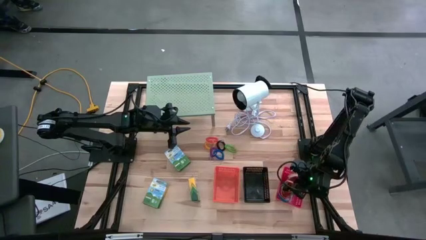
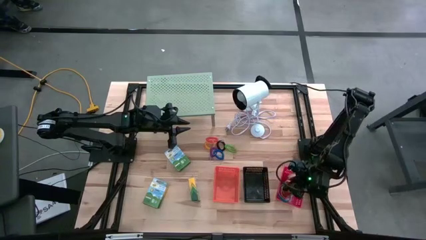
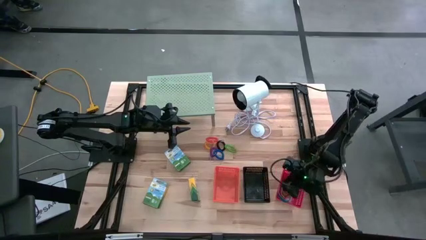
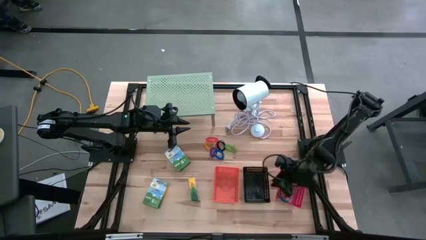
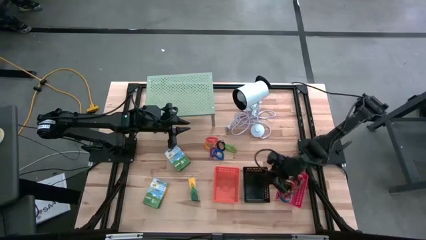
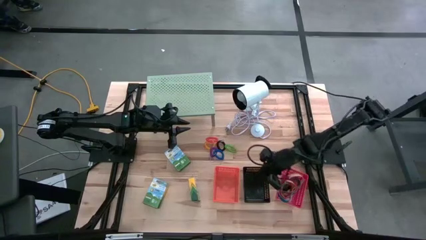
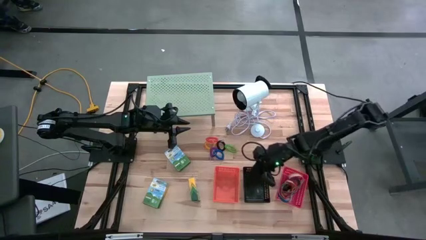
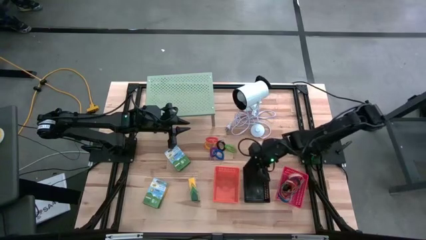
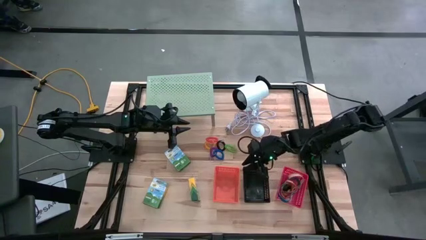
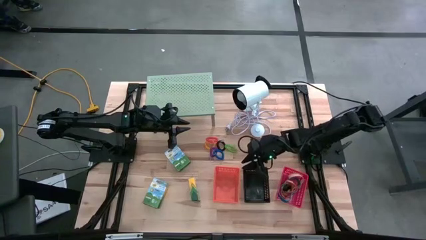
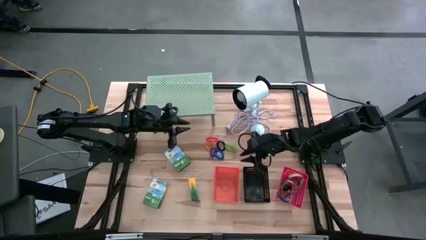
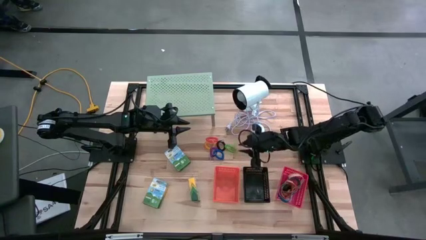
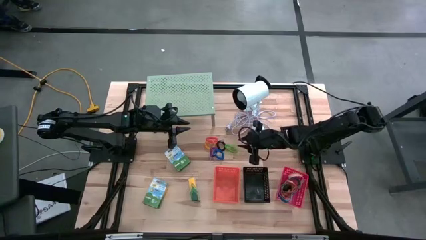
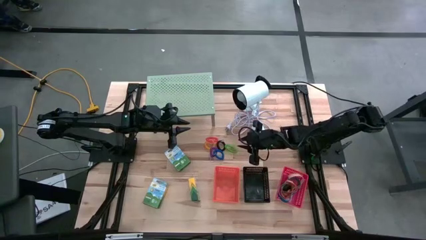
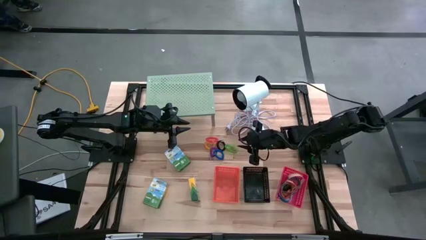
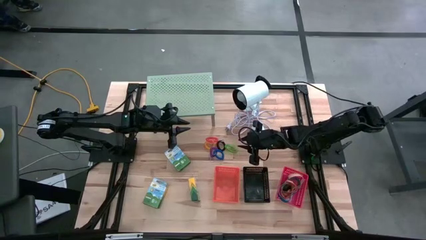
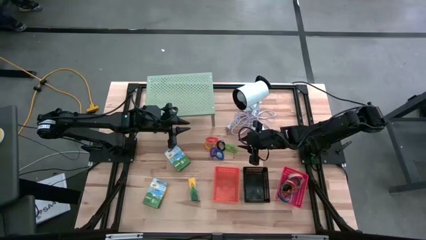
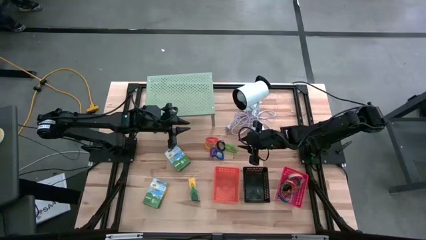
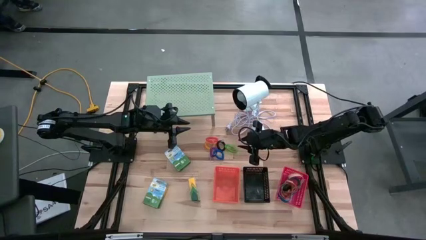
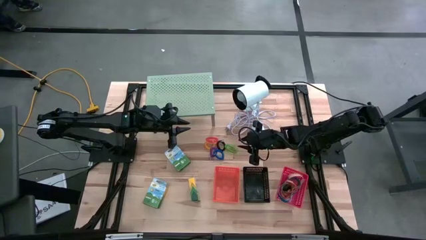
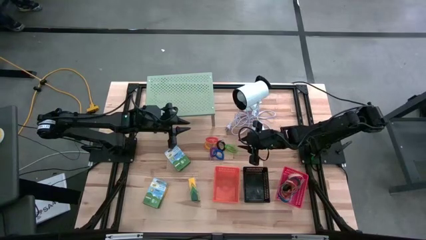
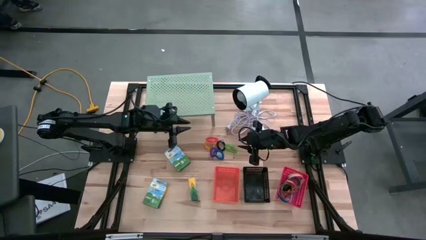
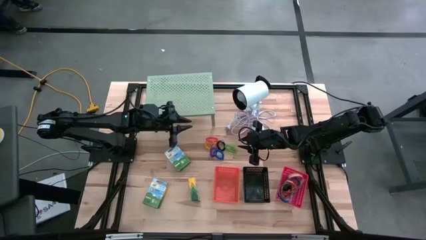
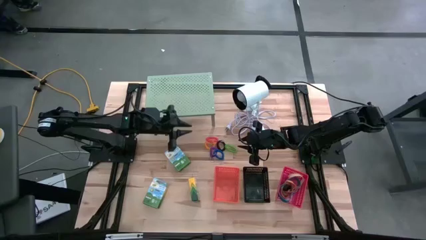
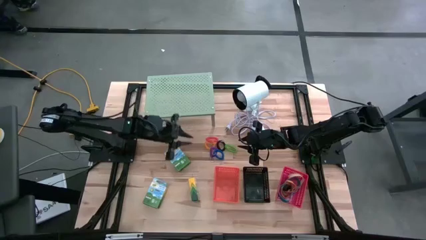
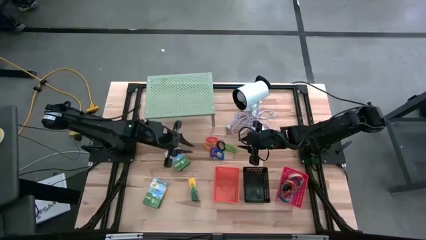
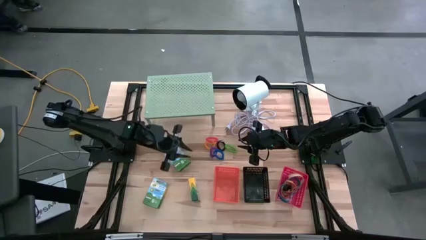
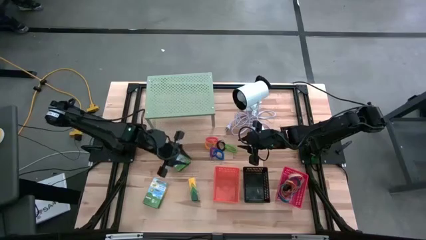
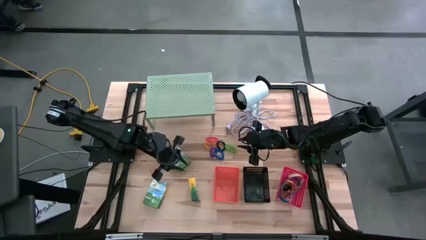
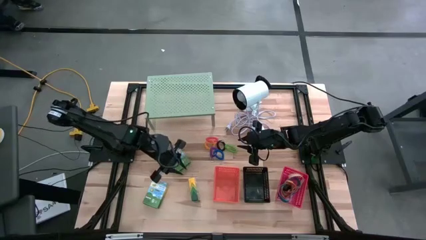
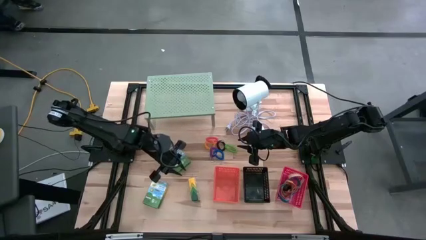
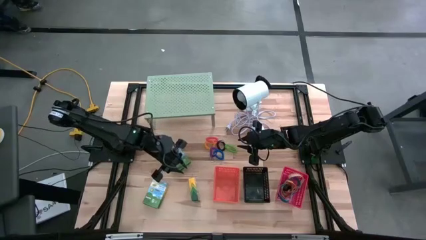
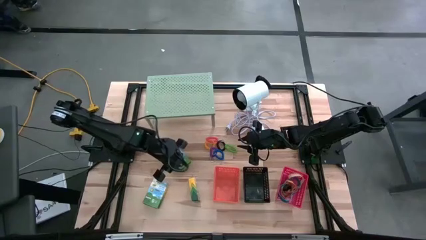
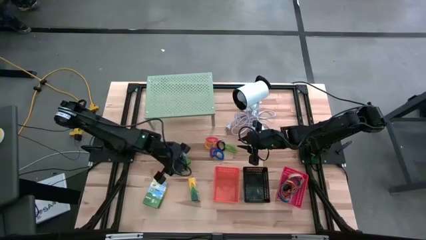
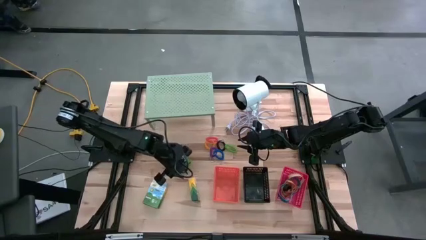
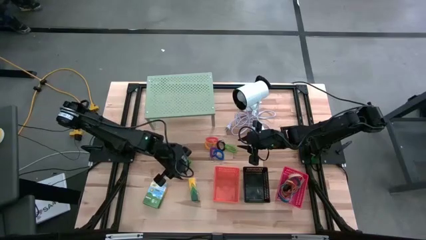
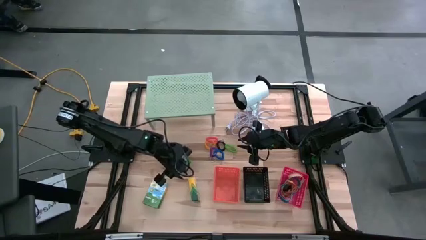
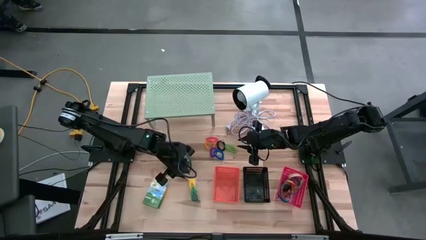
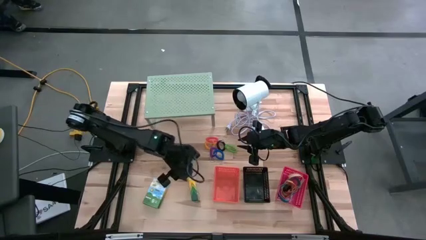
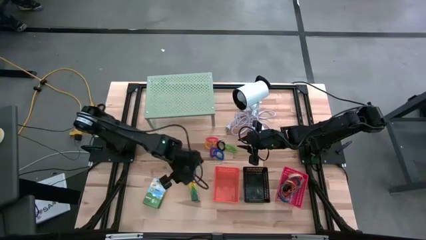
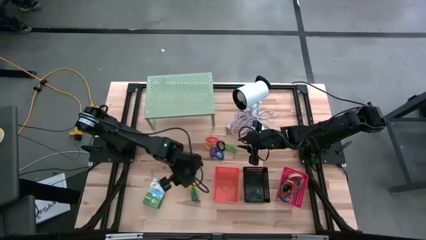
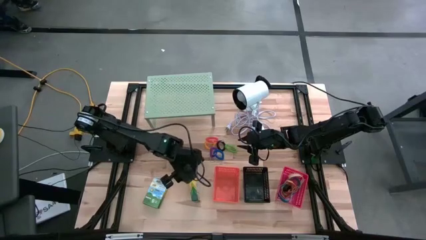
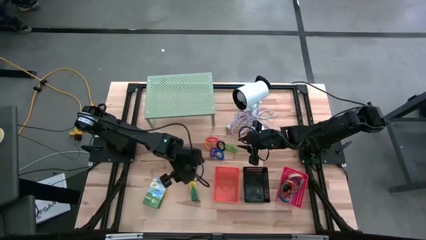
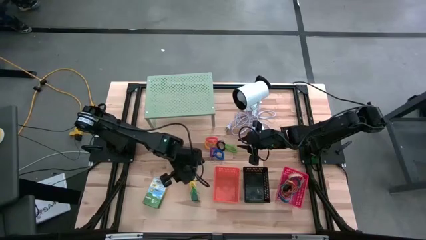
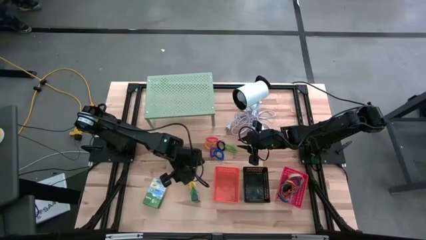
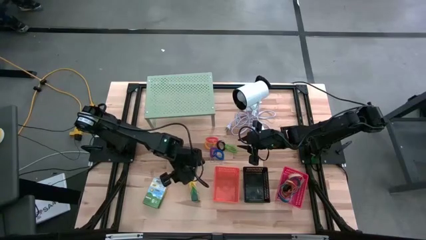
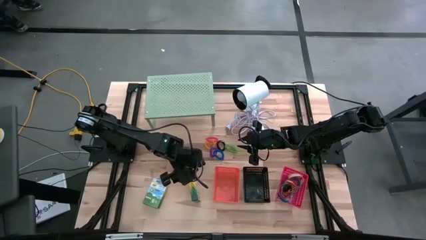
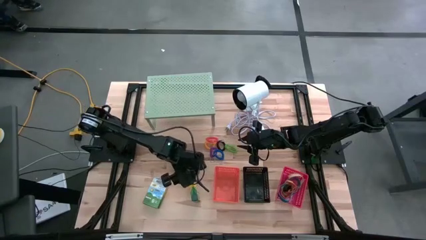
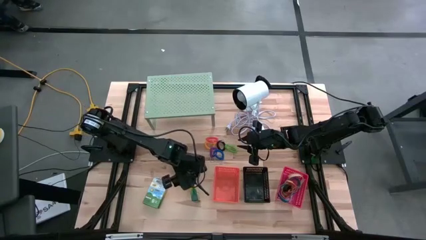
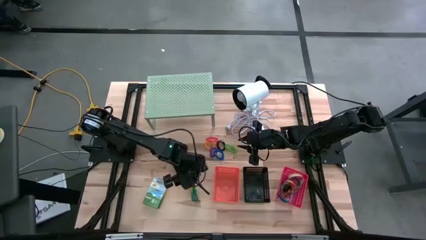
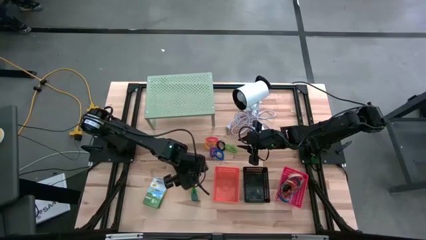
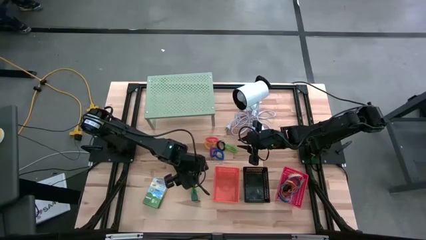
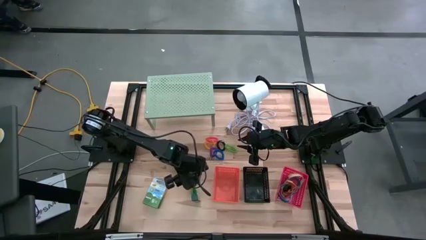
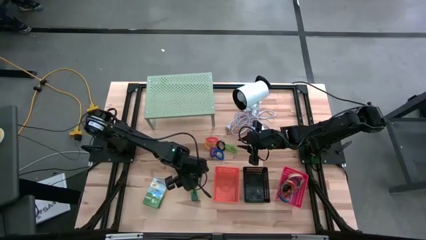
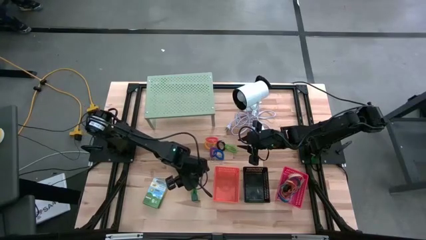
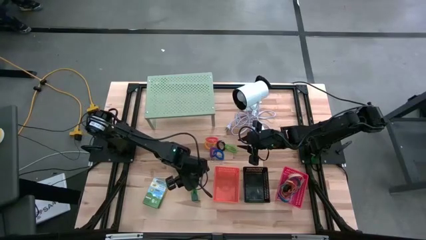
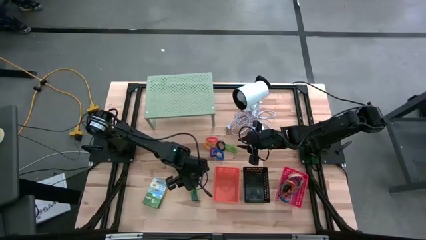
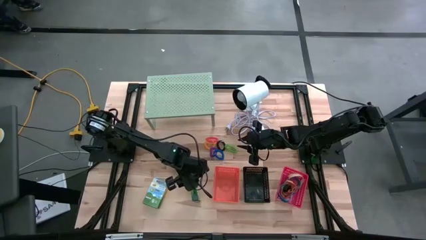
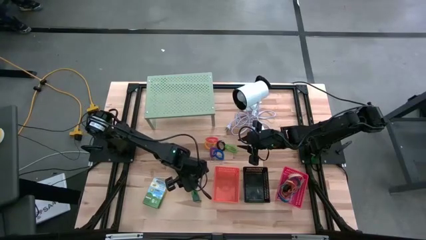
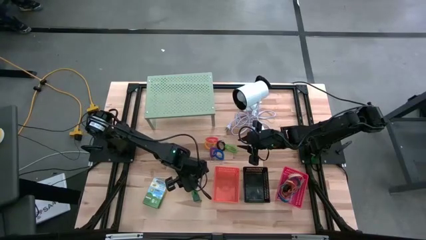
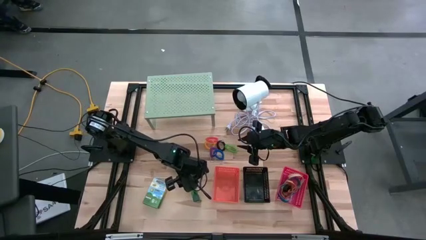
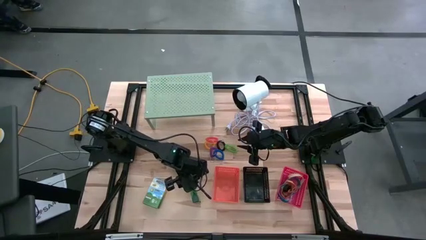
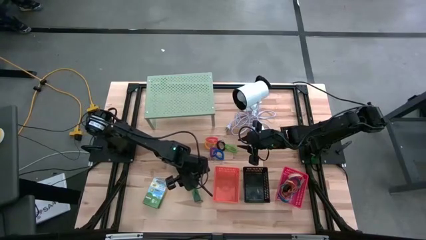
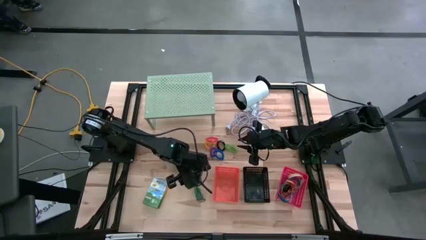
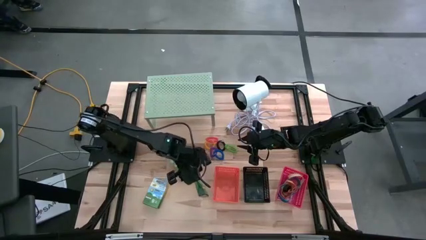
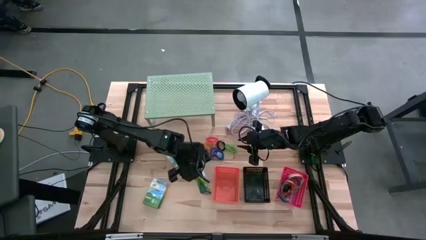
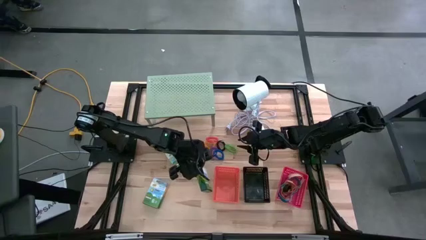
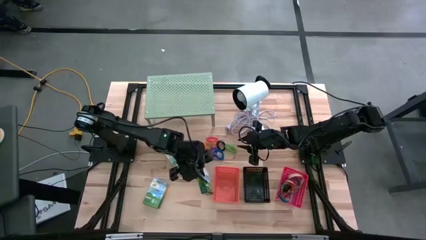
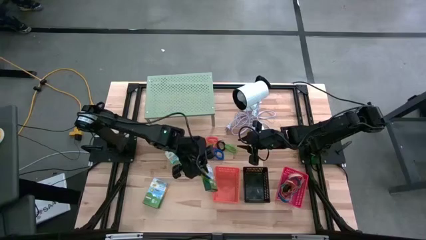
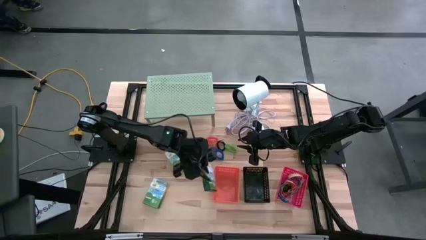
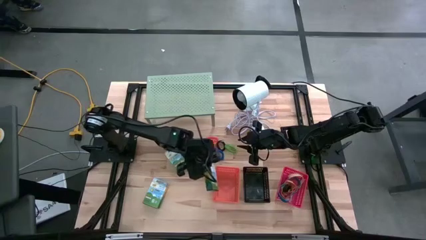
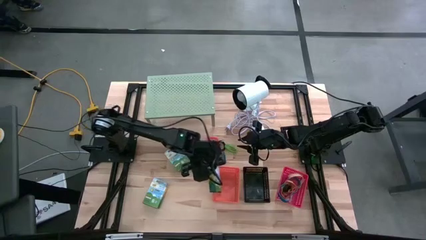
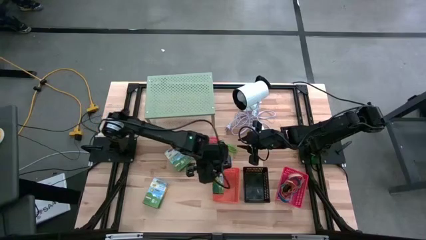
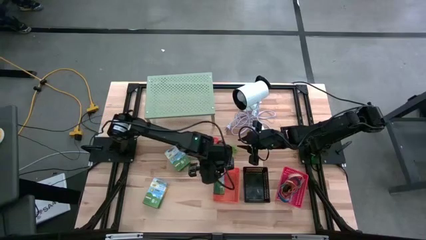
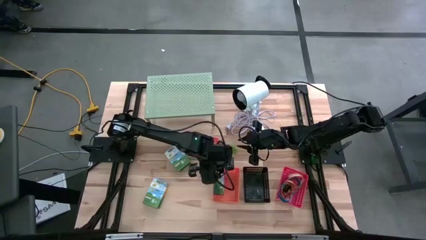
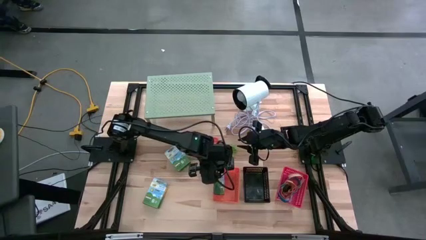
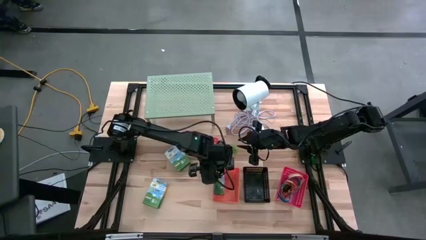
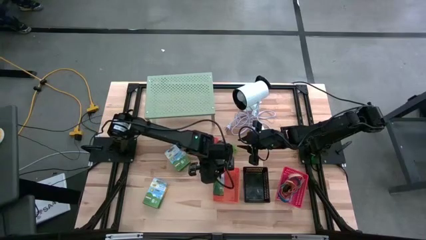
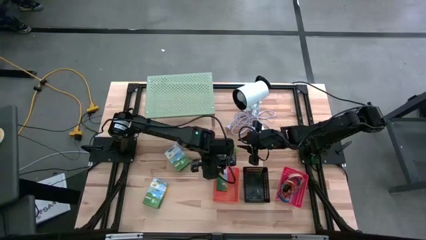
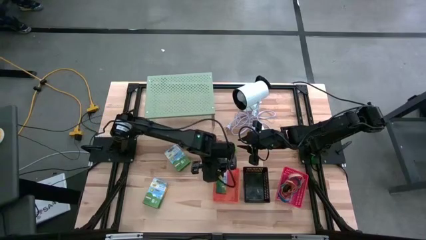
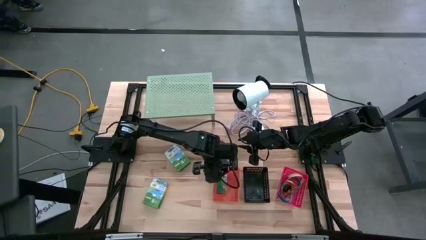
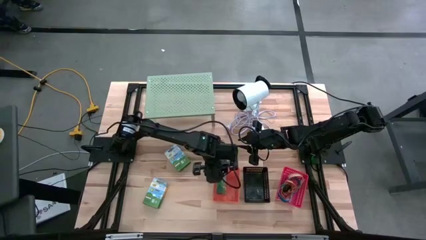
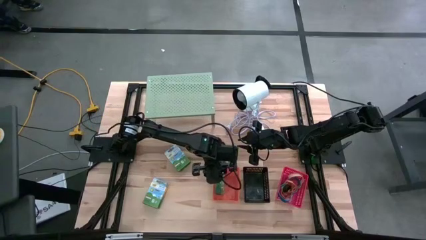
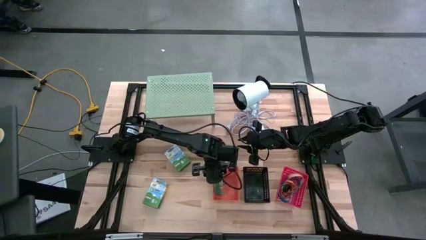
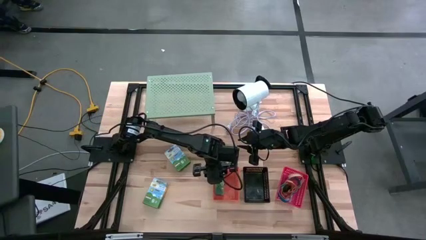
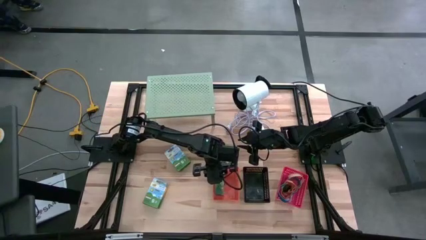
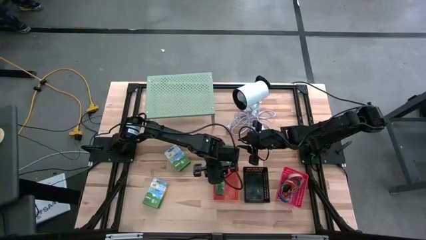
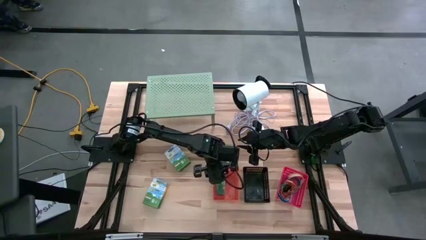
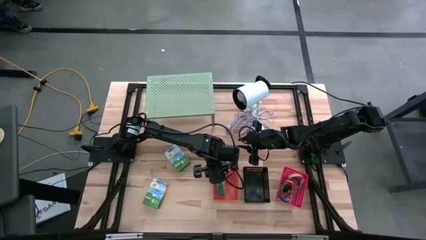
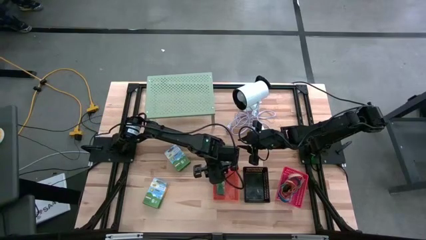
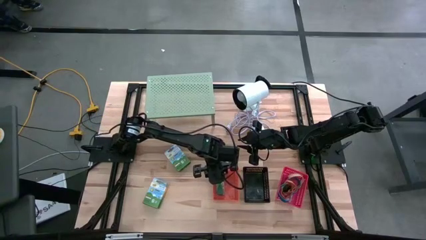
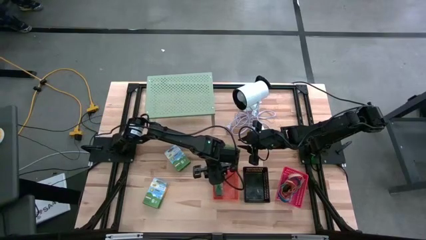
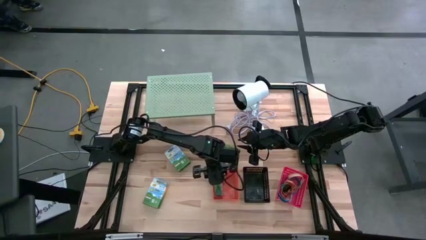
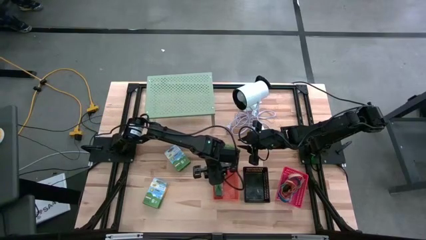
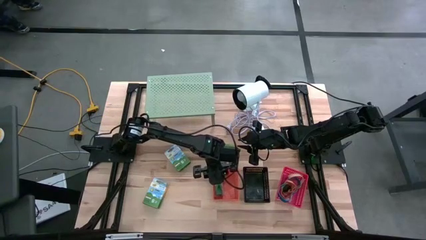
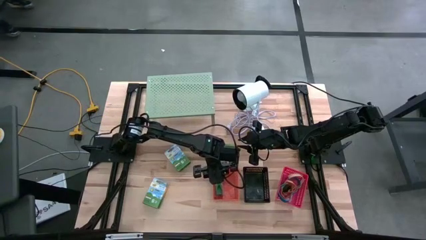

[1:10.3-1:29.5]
Task: Pick & Place Office Desk Supplies
Put the right crayon box into the orange basket
